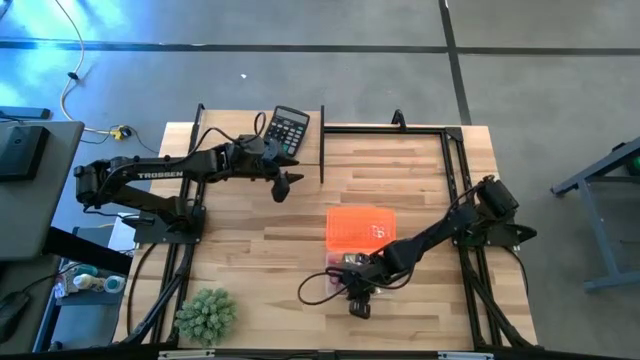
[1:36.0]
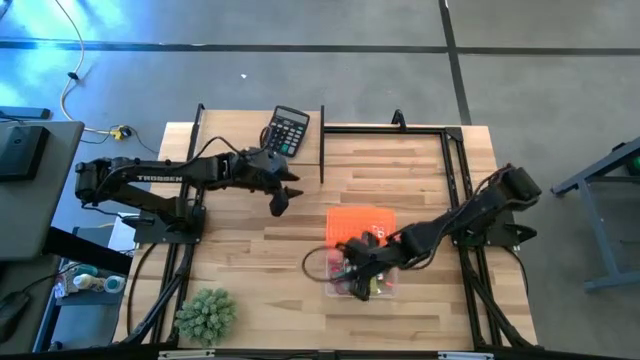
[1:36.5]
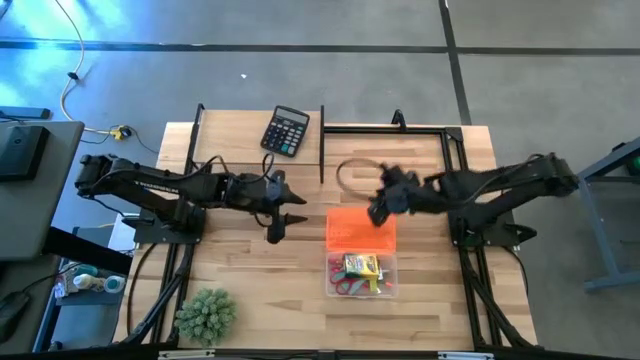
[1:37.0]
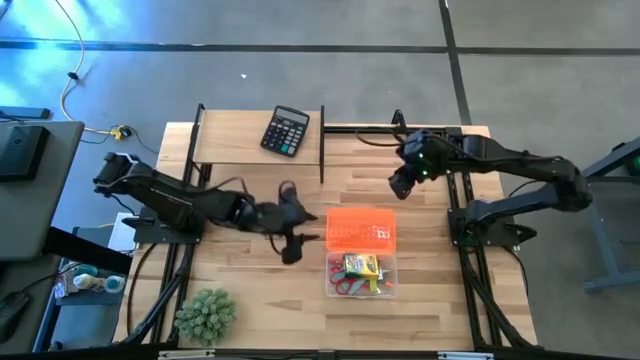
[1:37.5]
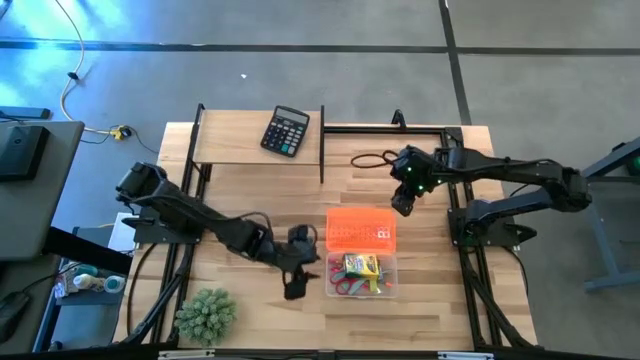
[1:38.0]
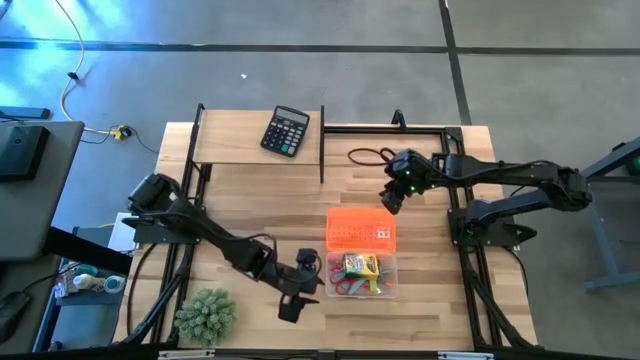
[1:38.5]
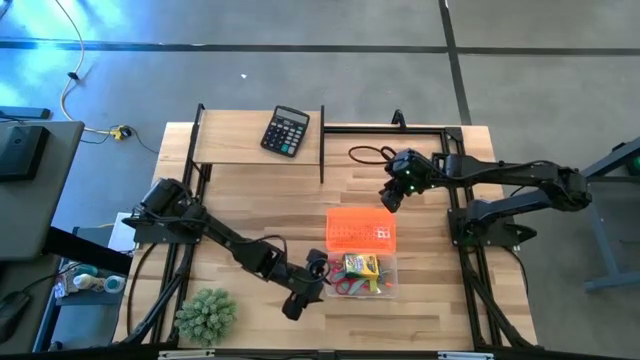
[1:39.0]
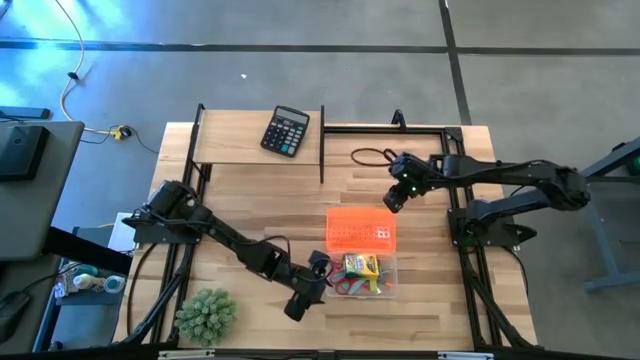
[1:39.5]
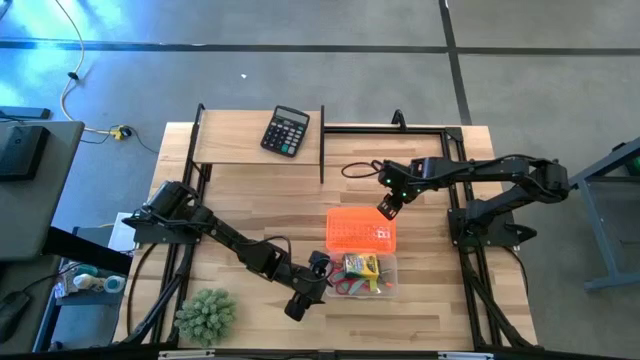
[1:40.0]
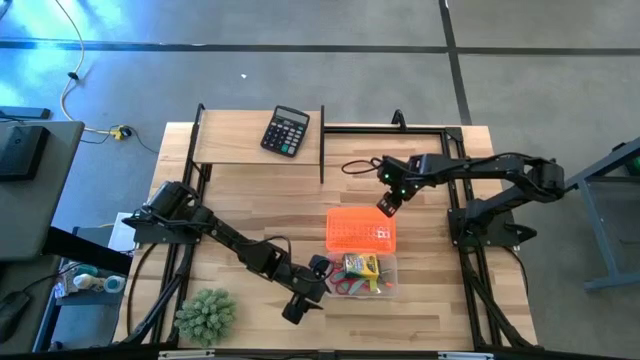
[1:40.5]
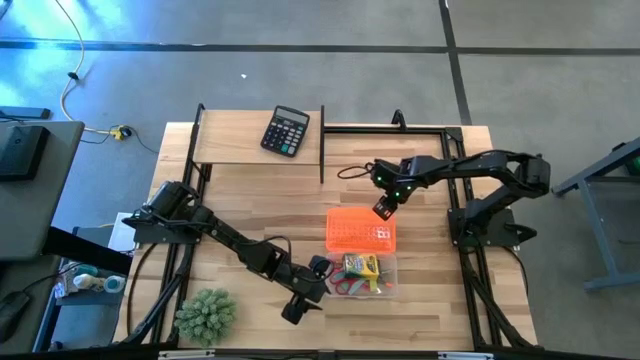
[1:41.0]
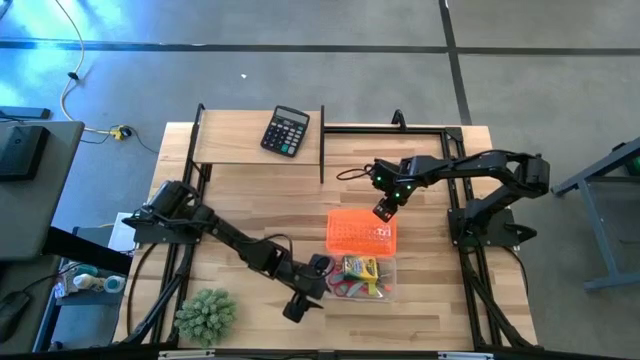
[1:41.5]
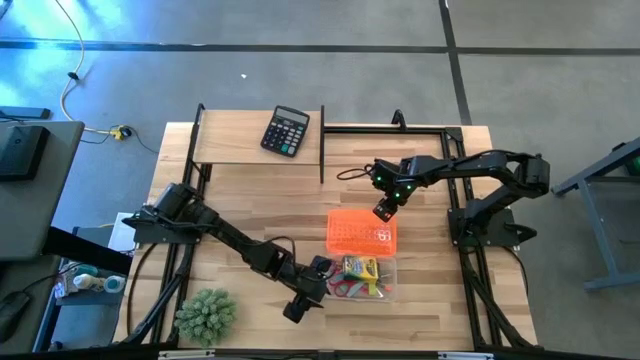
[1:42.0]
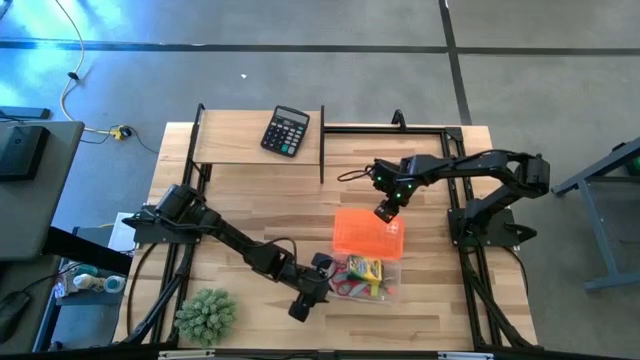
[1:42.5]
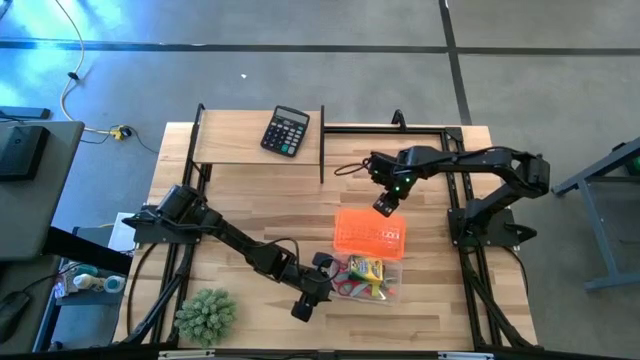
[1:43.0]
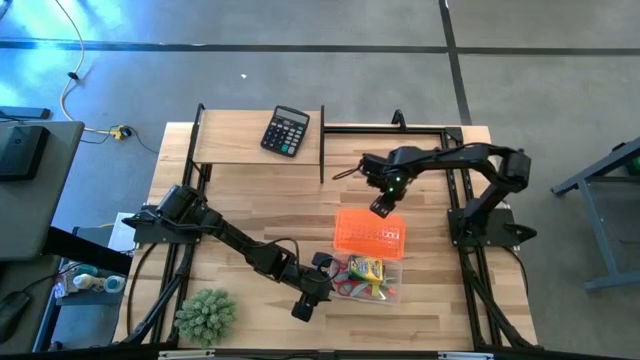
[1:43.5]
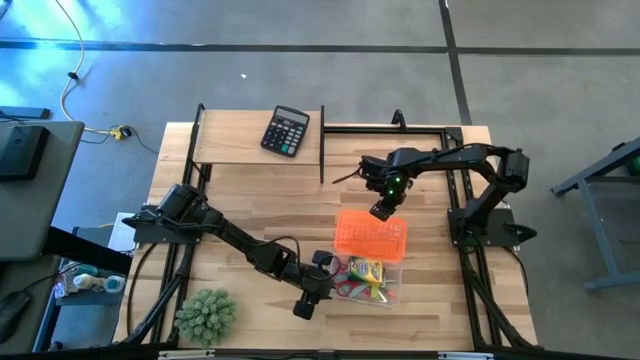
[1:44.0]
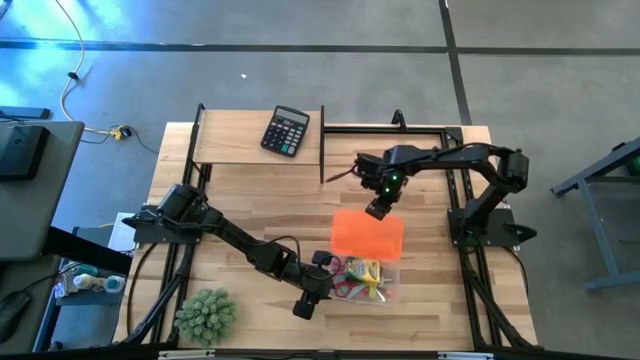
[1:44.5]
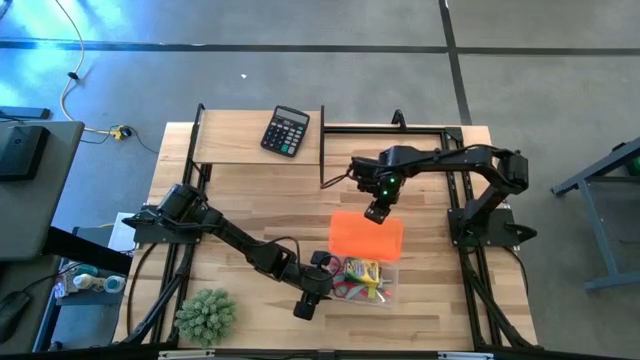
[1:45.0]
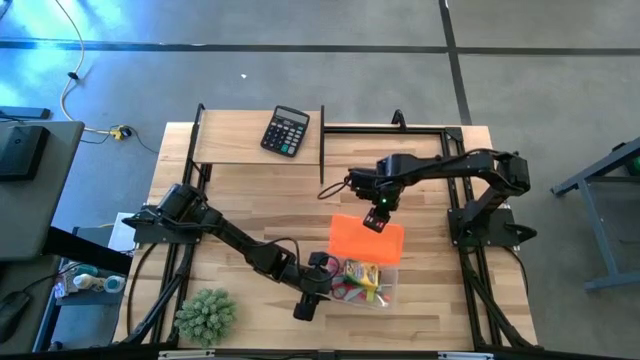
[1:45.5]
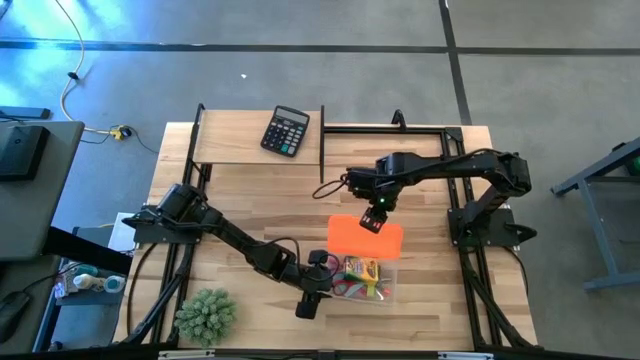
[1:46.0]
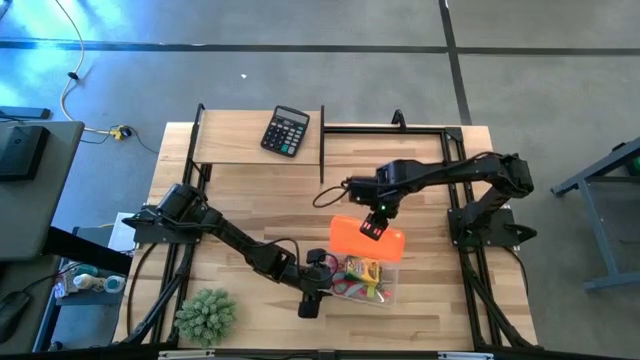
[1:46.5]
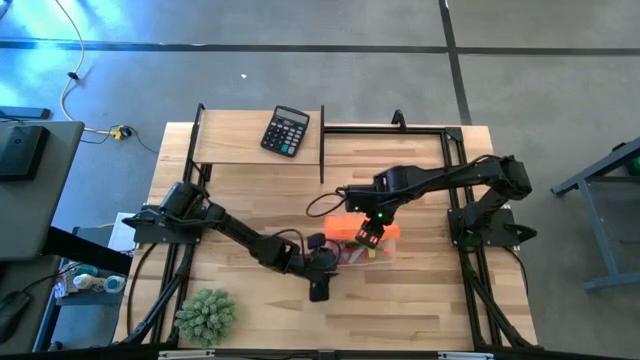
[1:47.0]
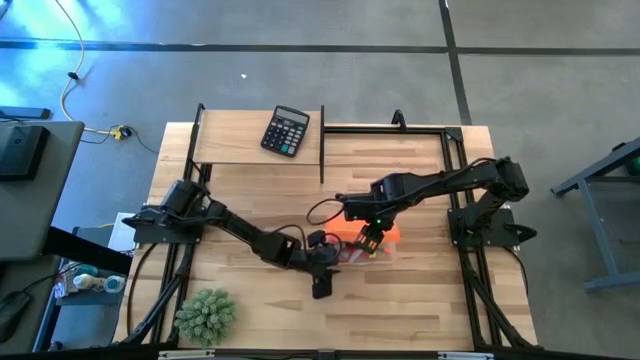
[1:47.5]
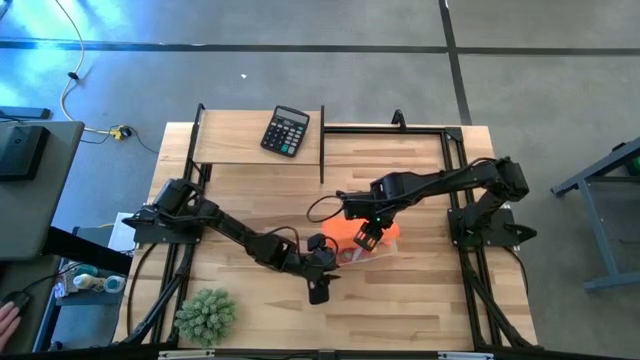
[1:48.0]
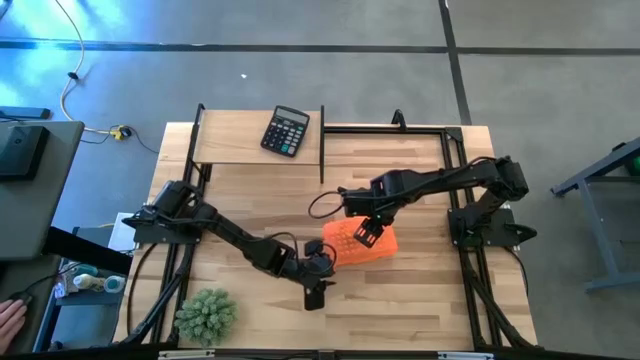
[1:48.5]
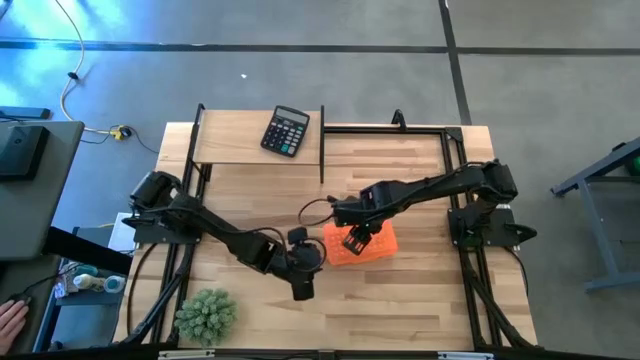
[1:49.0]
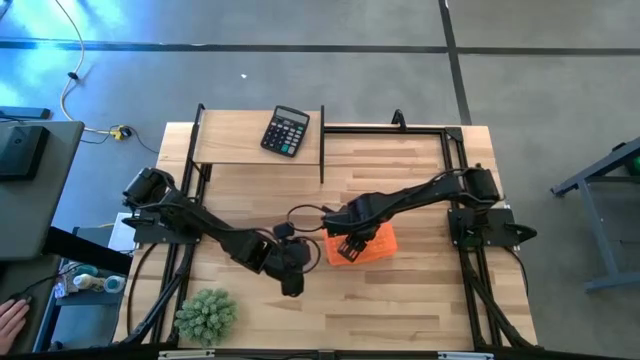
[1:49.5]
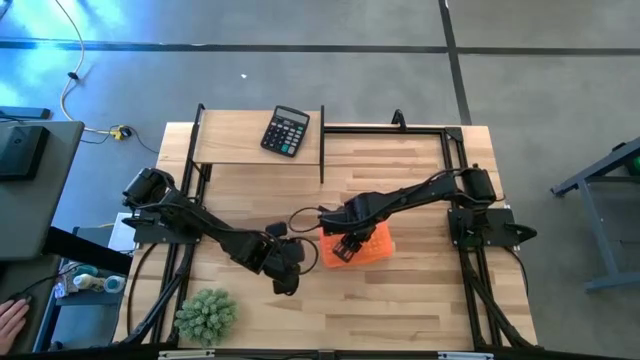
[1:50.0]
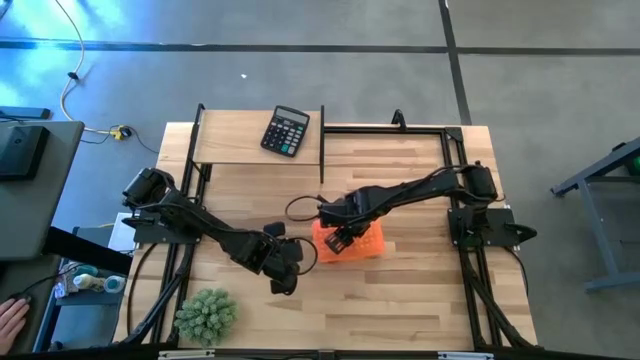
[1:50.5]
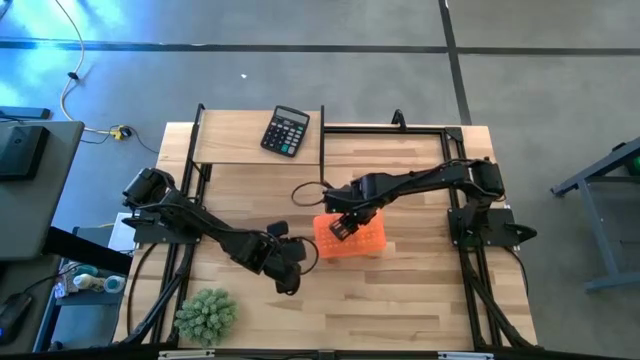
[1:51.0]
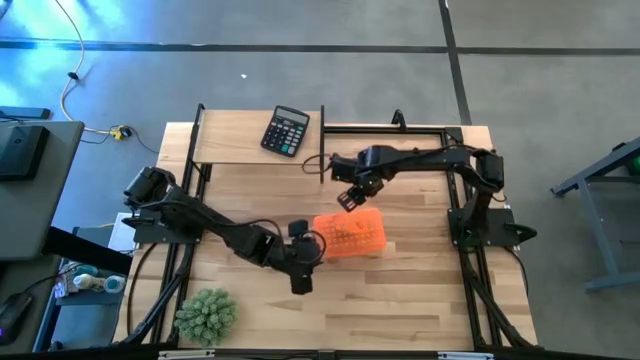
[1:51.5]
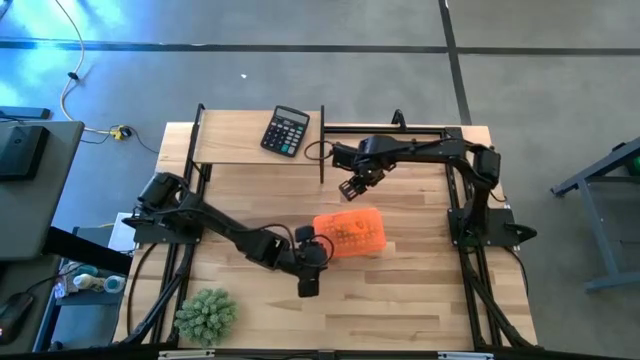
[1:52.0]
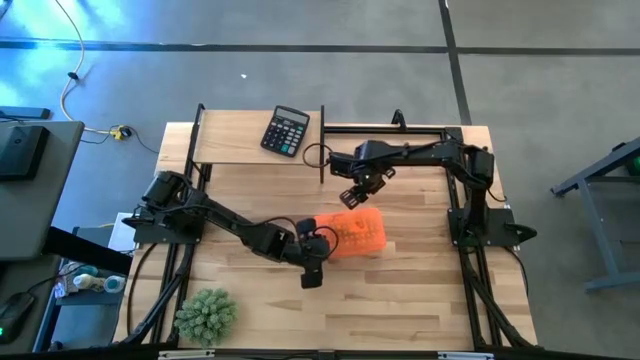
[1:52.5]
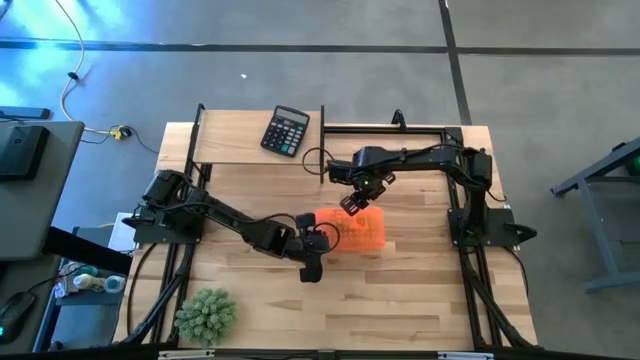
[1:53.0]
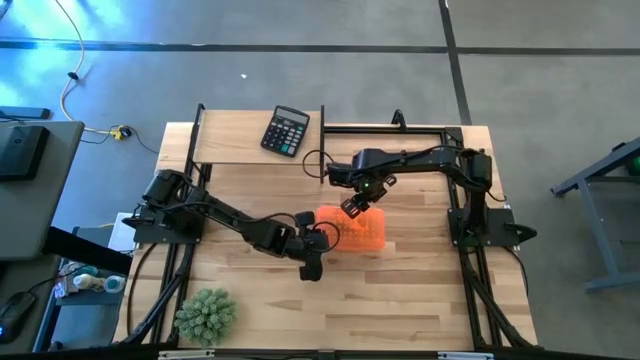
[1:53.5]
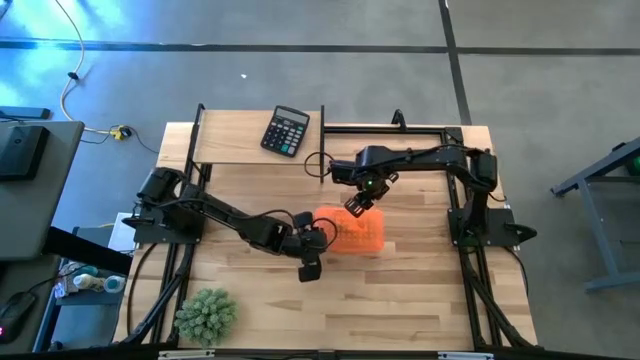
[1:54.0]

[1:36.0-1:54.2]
Task: Pack school essentials
Close the orange supply box

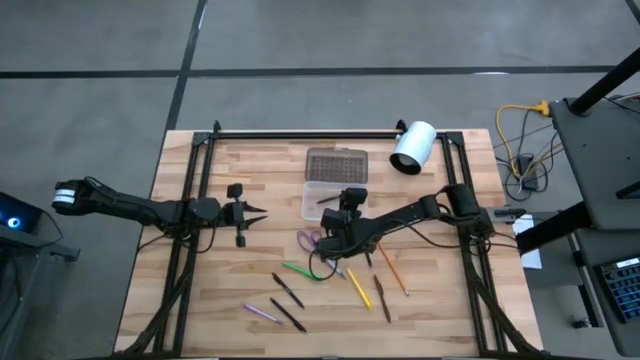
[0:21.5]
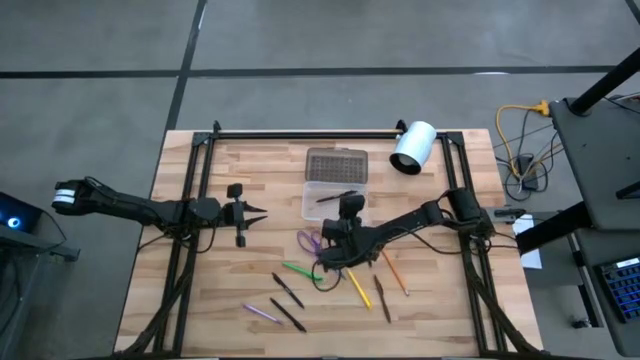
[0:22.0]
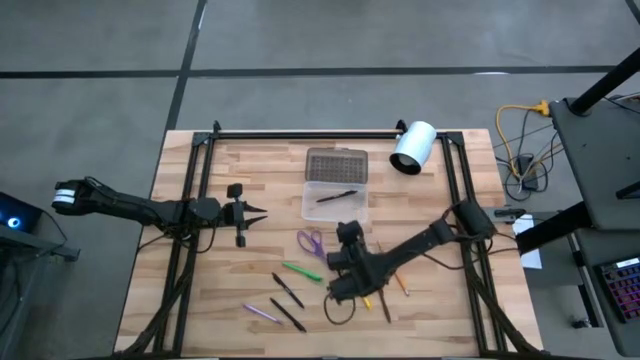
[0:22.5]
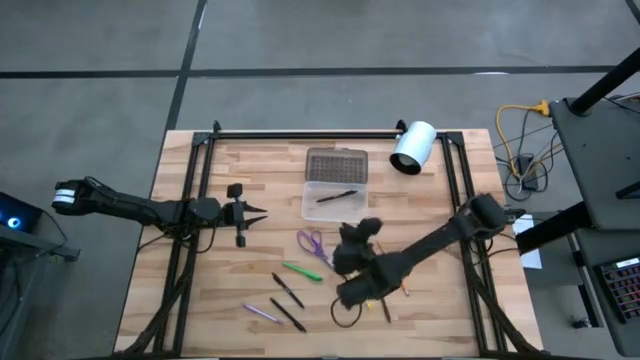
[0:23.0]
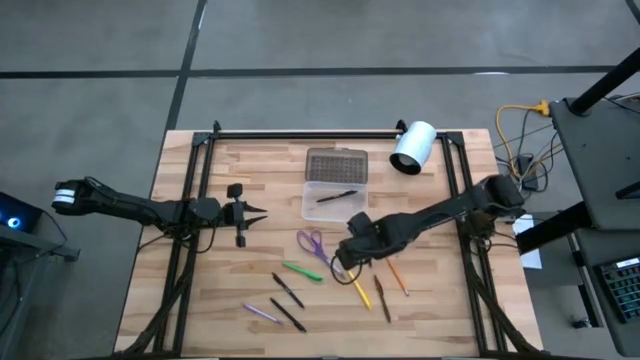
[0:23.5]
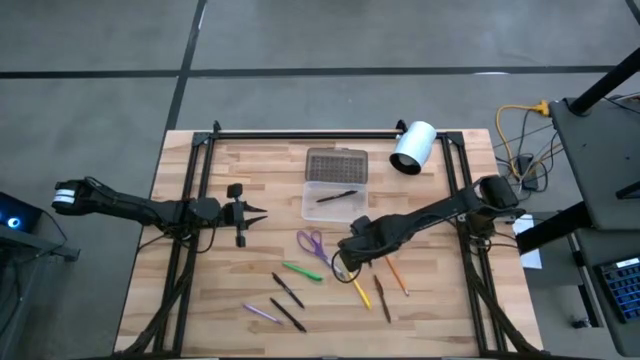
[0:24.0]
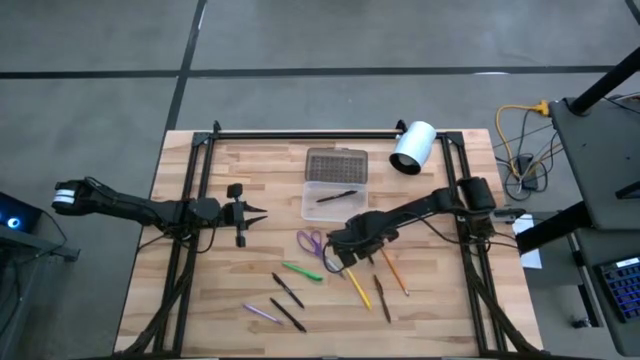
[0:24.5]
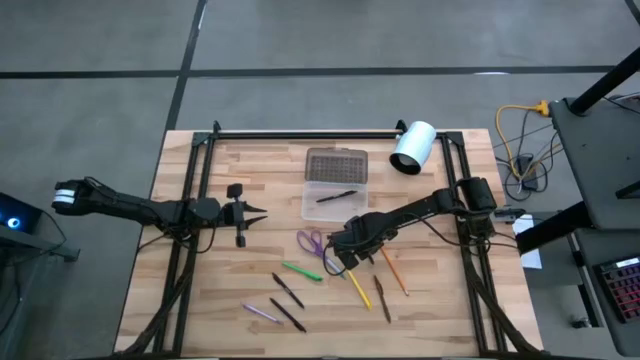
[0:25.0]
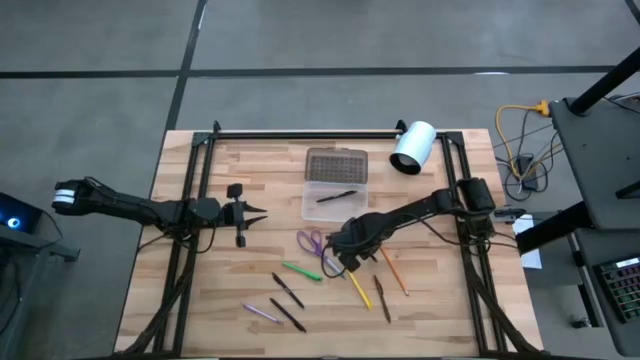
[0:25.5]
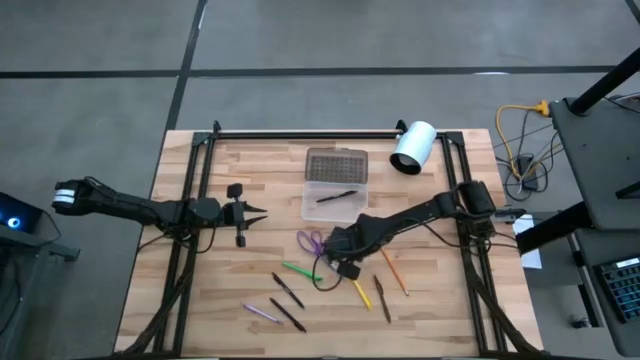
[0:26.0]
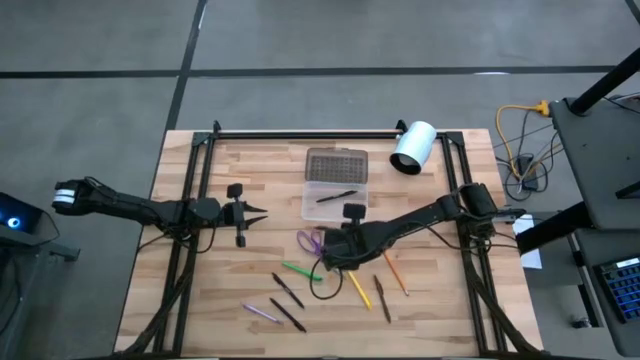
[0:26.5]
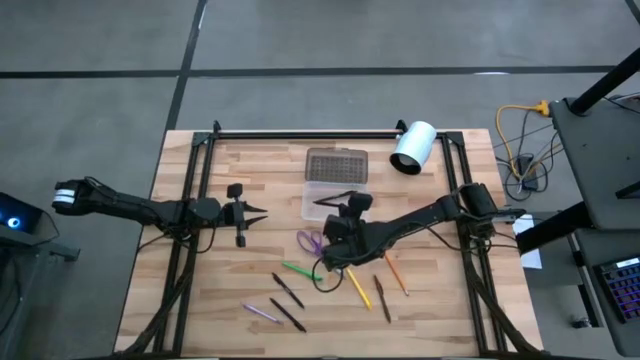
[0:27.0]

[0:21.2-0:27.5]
Task: Pick & place school supplies into a supply box
Put the top right black pen into the transparent bin
